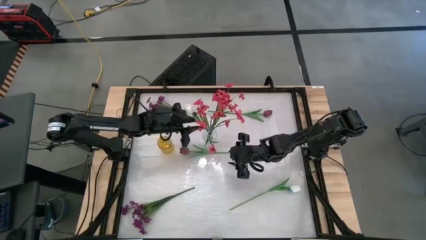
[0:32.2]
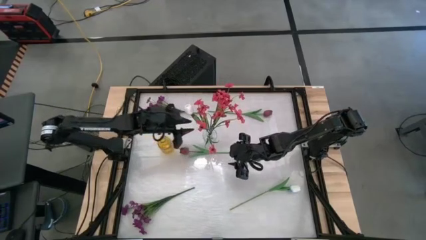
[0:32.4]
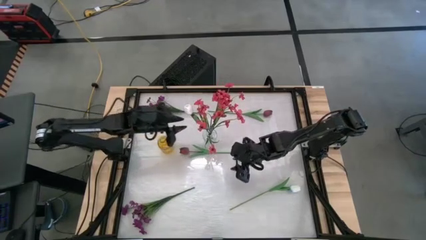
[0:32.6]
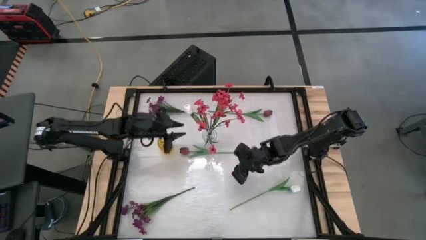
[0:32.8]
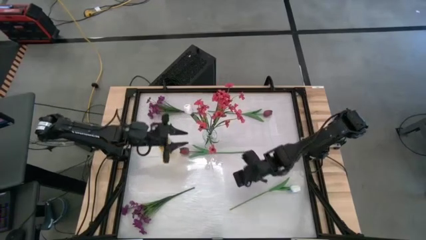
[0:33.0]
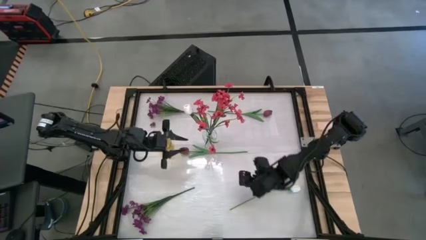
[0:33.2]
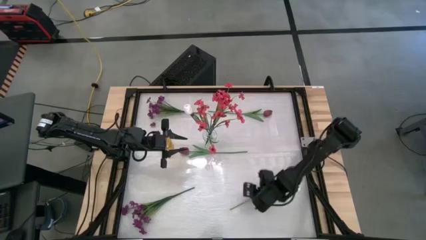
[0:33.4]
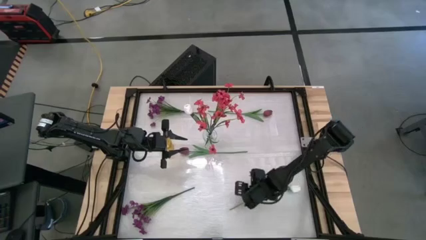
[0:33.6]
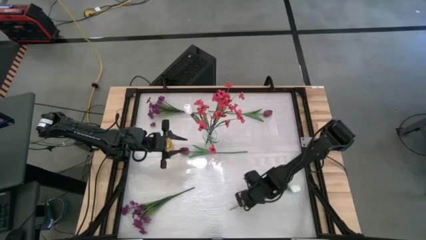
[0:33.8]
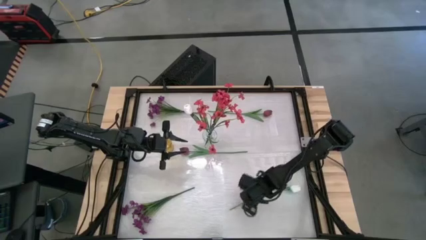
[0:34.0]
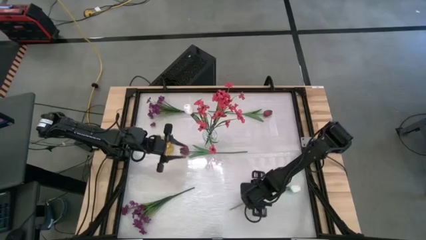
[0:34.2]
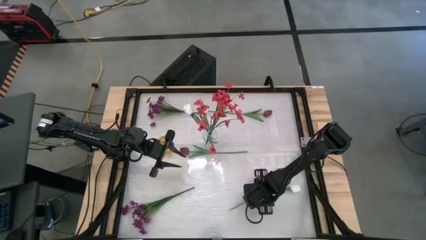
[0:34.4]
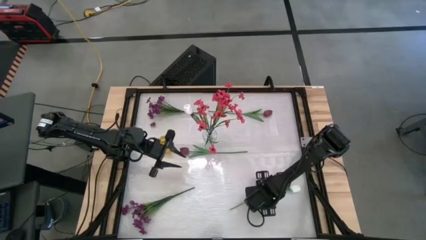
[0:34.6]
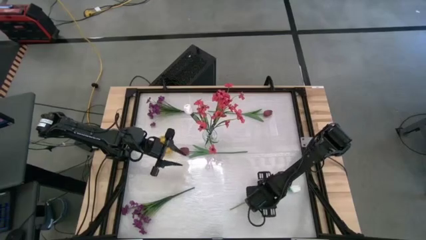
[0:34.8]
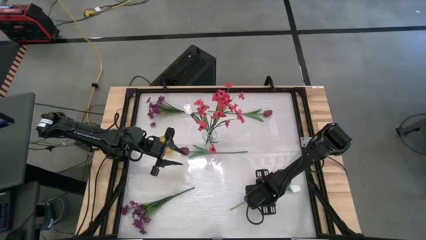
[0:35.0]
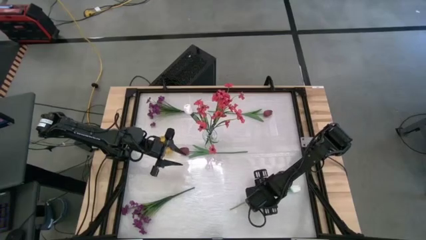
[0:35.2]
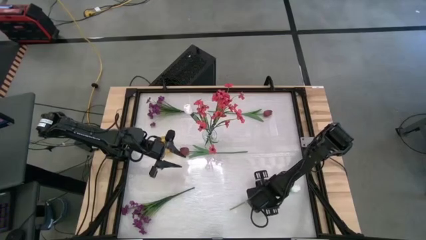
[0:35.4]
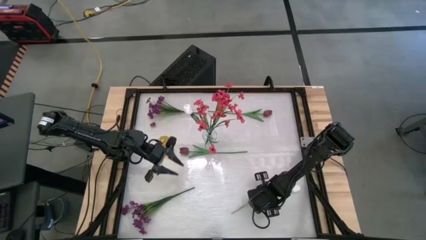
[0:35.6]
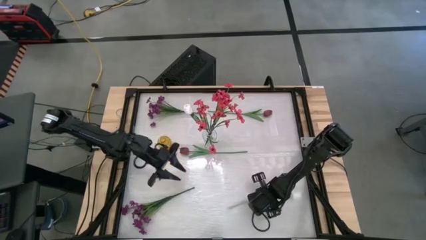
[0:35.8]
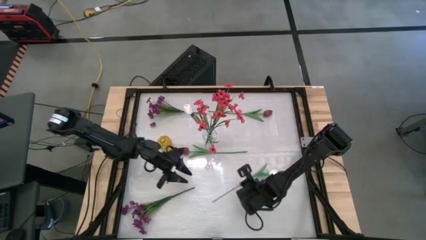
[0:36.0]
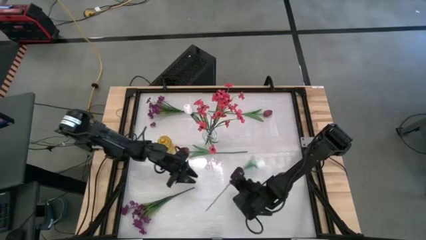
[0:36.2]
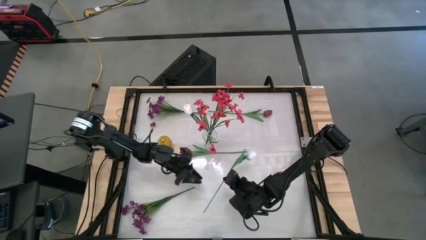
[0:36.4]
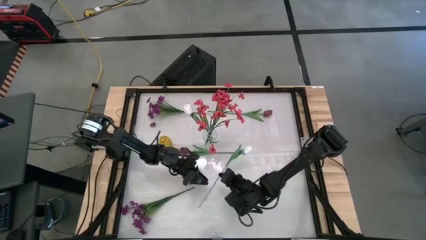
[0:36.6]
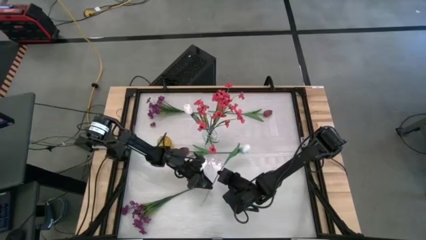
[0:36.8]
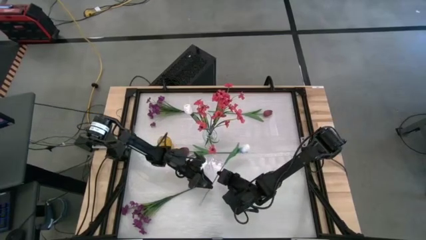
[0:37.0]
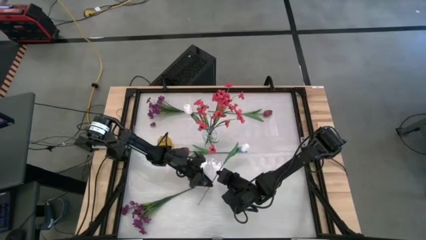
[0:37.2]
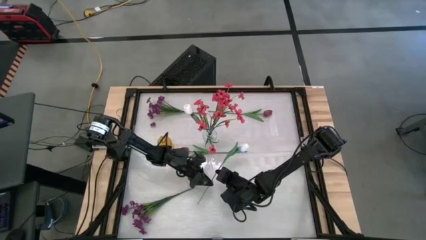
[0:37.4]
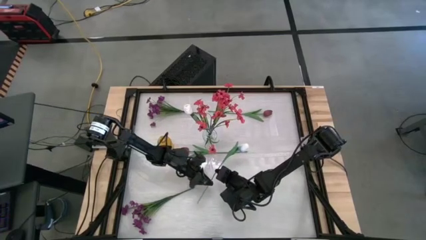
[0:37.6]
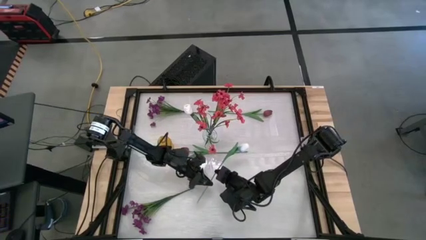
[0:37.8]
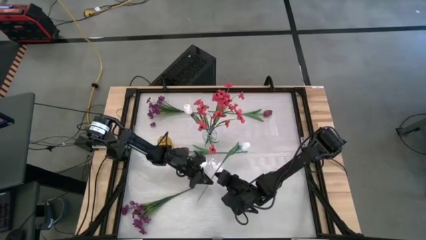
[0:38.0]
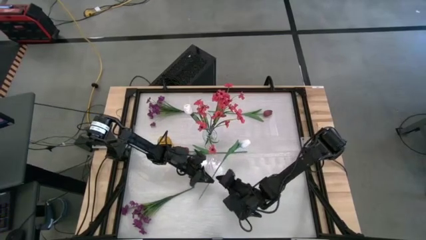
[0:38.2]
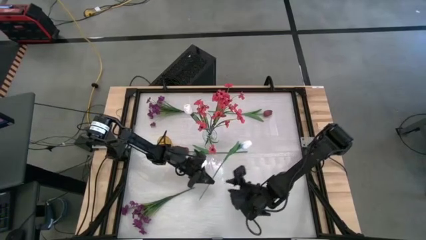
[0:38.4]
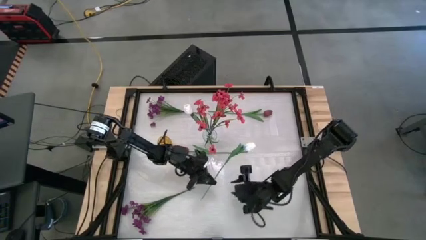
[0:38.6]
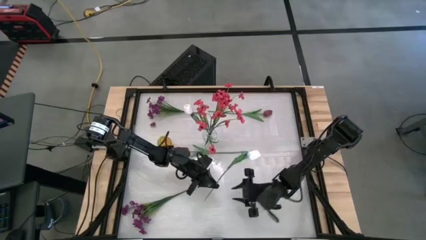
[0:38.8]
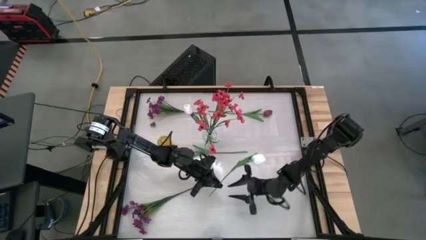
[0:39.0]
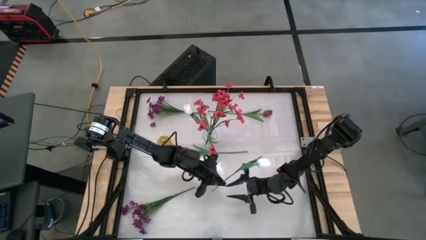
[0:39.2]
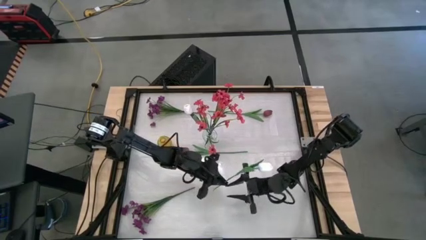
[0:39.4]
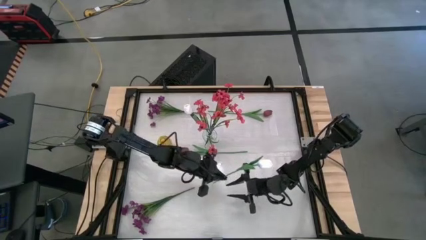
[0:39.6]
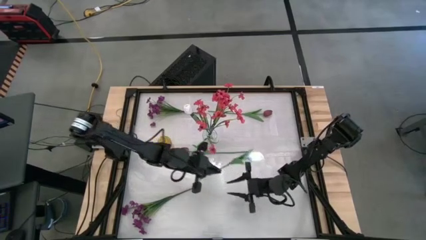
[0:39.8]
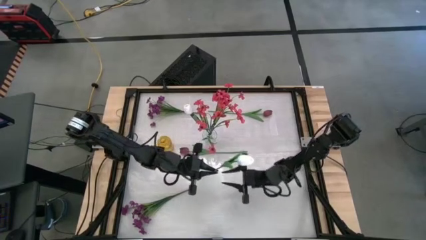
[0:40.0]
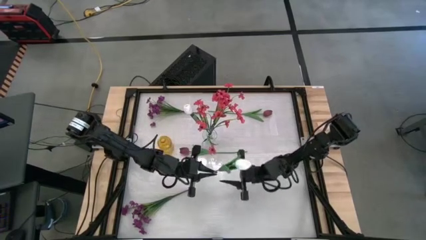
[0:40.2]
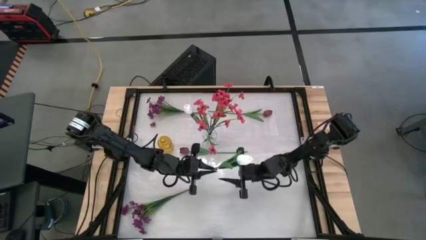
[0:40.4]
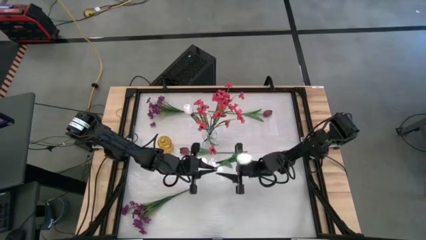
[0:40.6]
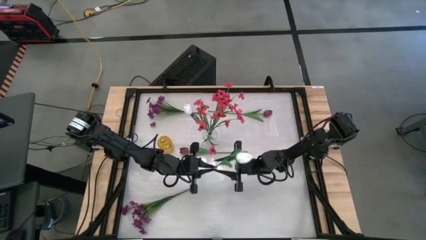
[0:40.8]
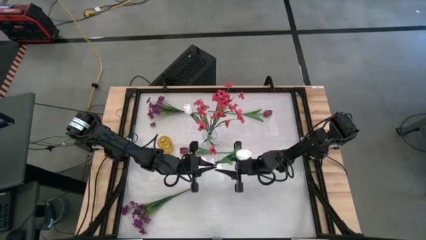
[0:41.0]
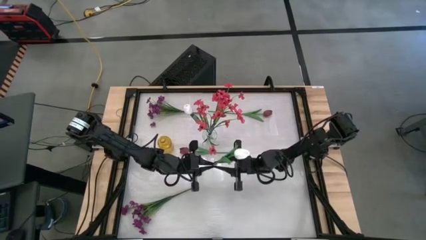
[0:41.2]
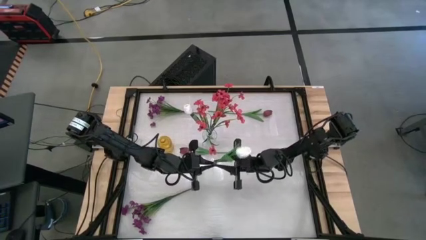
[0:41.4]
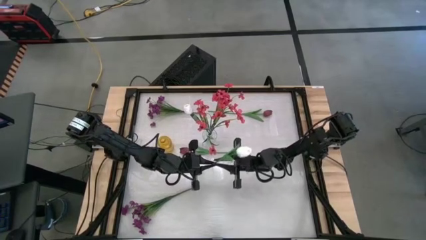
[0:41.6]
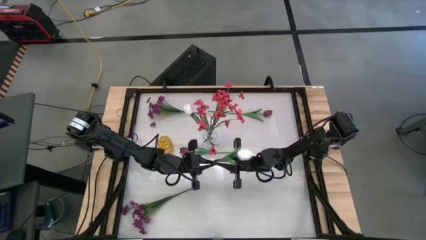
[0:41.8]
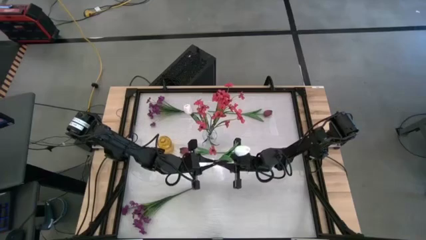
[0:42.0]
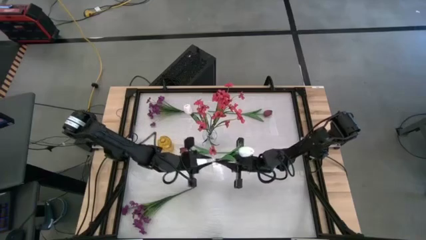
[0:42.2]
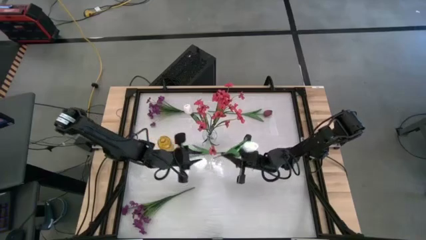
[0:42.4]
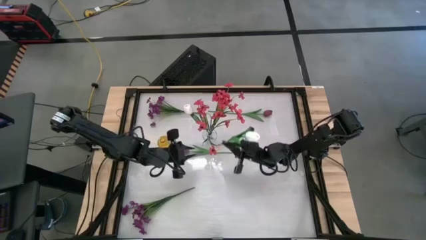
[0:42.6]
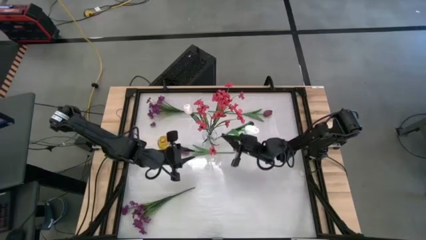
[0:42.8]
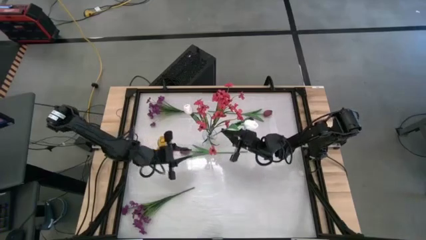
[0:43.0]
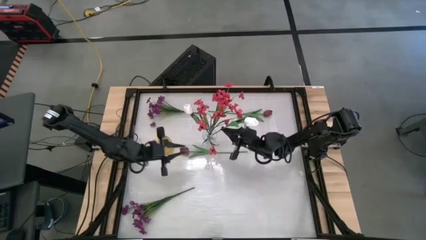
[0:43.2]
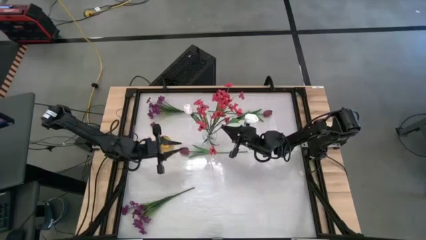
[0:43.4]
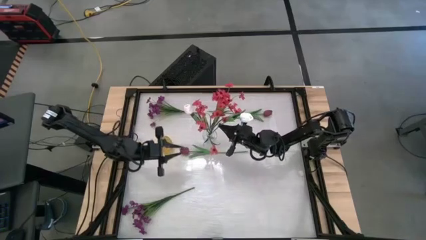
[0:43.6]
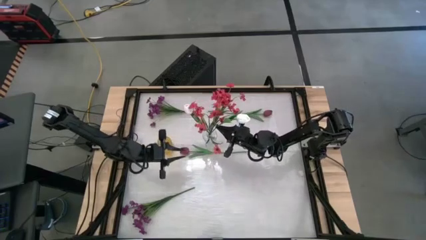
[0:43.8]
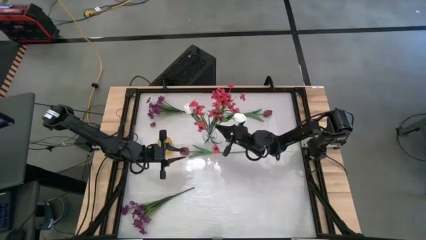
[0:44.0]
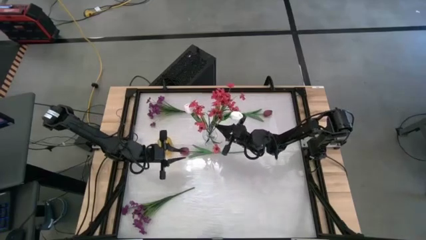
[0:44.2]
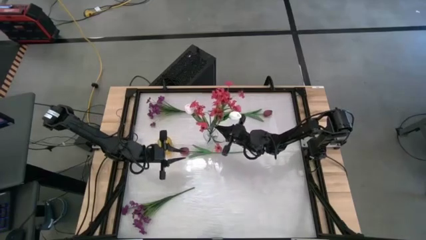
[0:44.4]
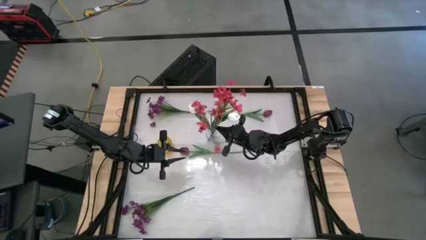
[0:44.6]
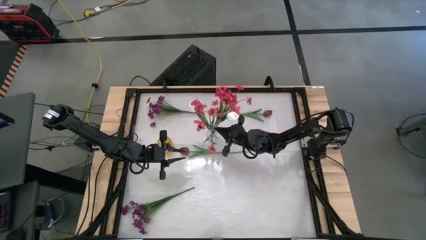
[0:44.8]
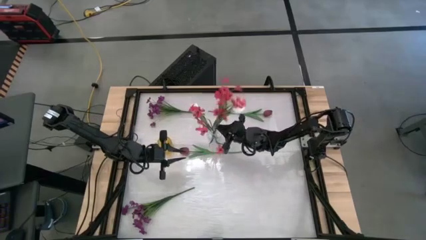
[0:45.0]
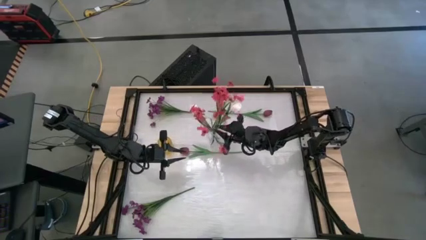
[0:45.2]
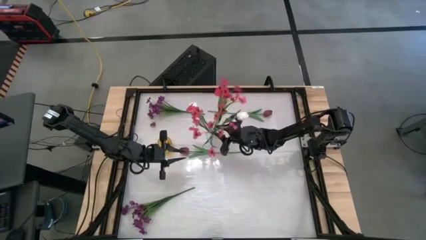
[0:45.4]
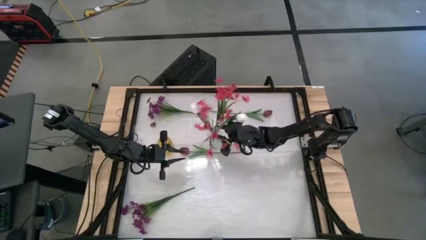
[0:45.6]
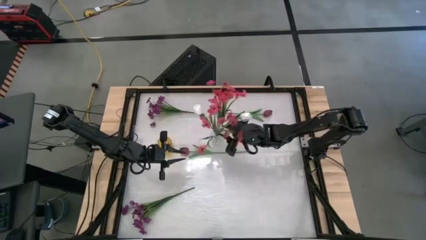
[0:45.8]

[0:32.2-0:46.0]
Task: Sort flowers into vase by color
Put the white tulip into the transparent vase

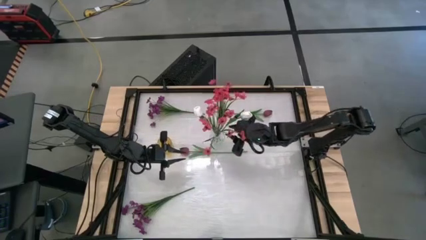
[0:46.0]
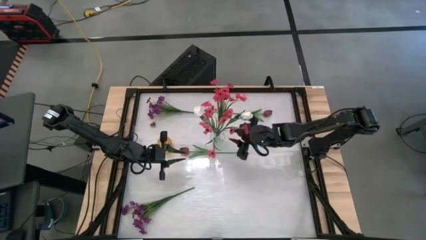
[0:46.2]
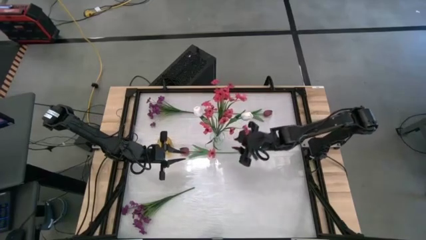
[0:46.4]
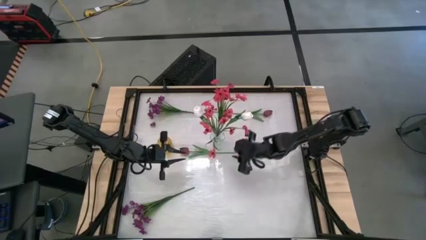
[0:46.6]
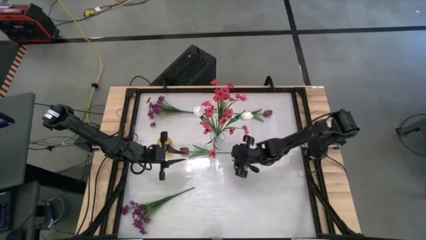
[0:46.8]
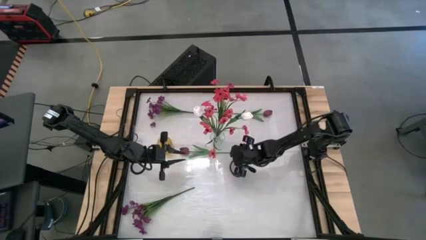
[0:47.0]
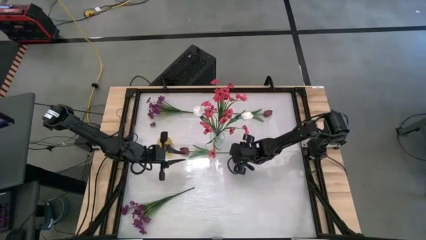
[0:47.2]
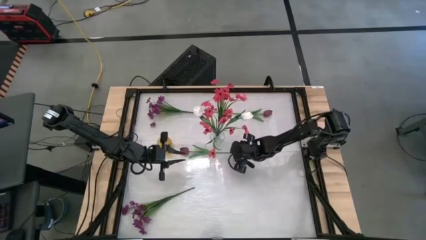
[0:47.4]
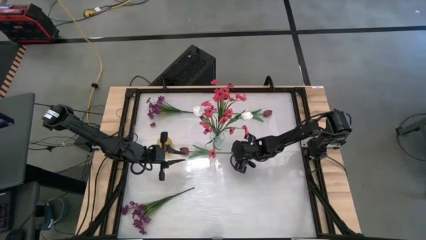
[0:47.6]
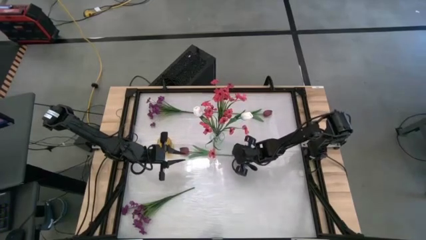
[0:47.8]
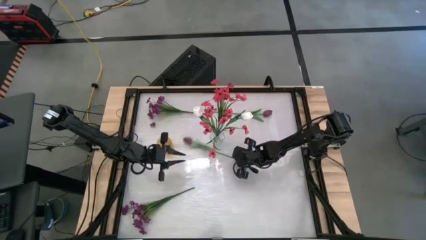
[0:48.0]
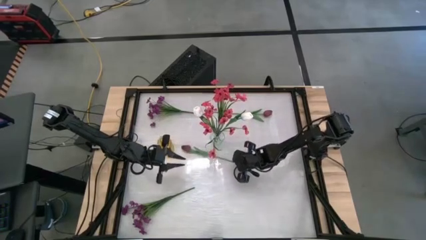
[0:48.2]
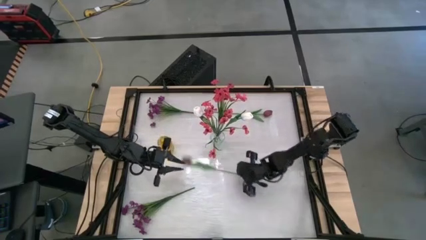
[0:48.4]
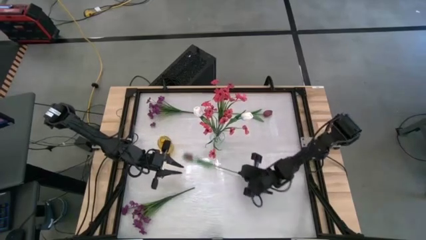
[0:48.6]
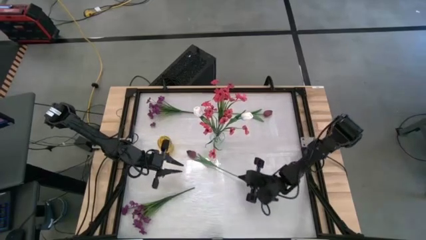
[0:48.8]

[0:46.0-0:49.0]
Put the bottom red tulip into the yellow vase
